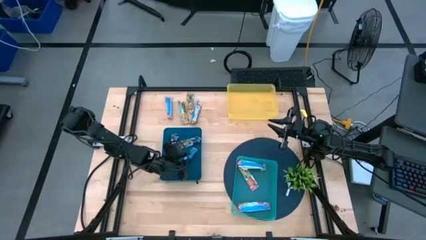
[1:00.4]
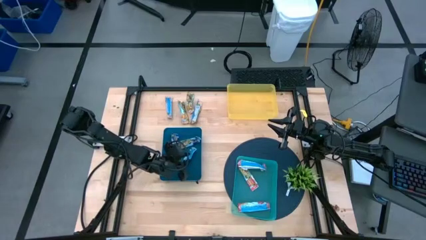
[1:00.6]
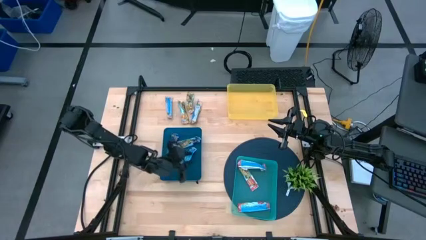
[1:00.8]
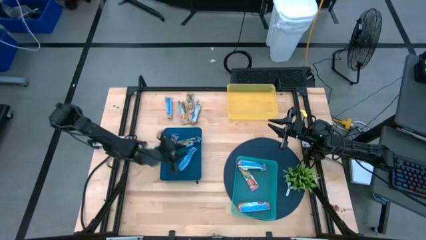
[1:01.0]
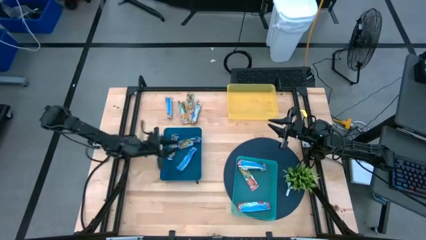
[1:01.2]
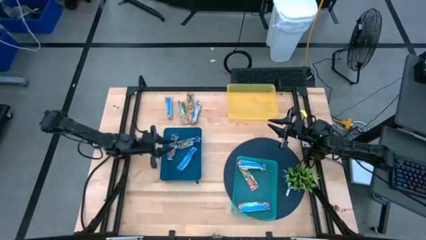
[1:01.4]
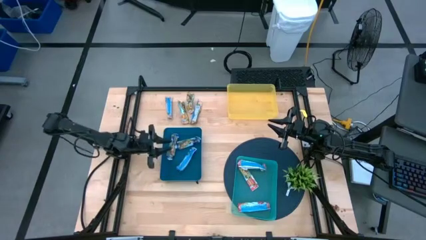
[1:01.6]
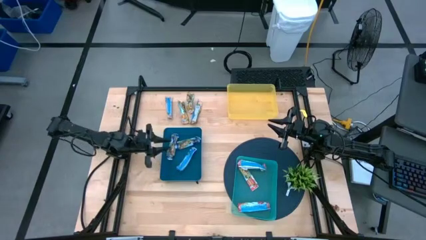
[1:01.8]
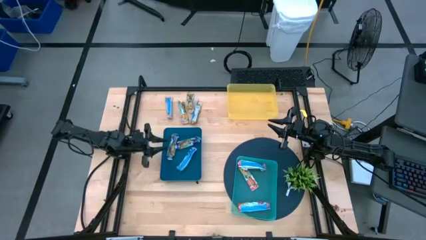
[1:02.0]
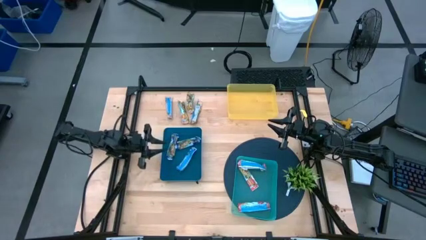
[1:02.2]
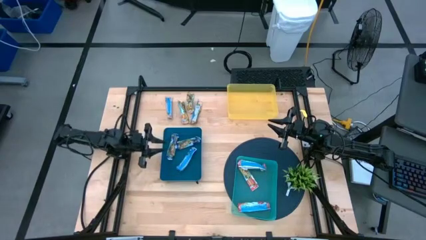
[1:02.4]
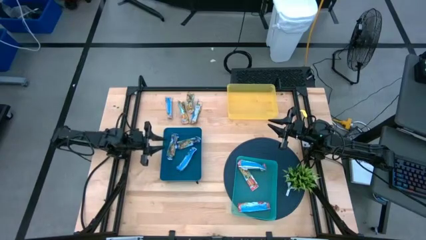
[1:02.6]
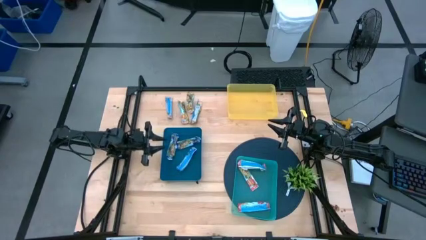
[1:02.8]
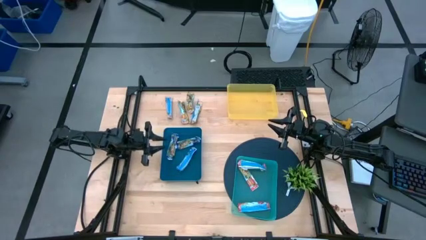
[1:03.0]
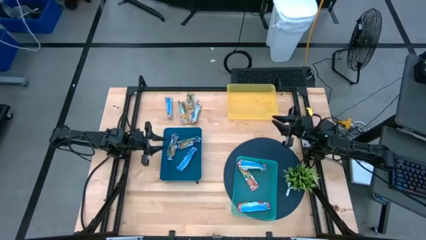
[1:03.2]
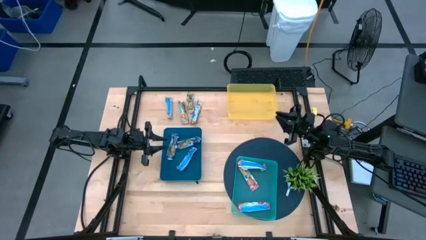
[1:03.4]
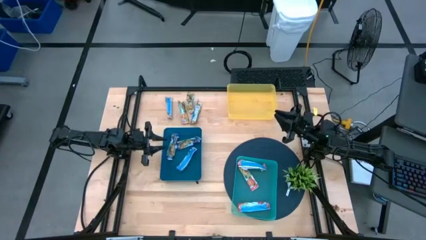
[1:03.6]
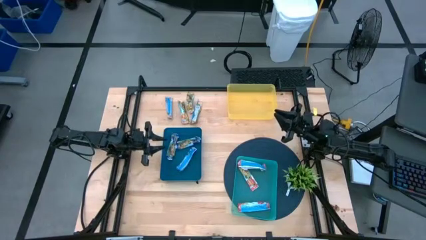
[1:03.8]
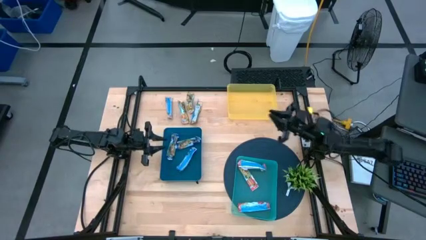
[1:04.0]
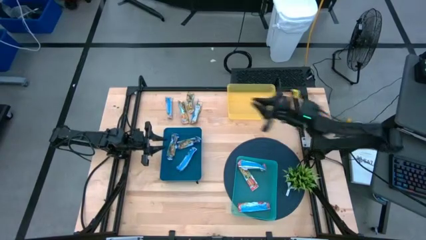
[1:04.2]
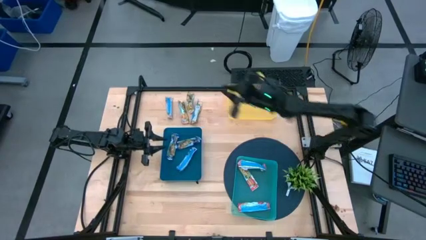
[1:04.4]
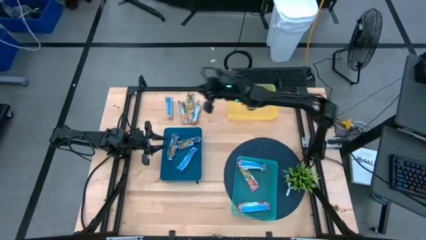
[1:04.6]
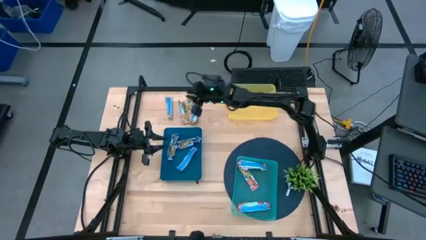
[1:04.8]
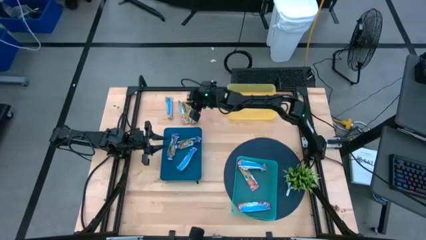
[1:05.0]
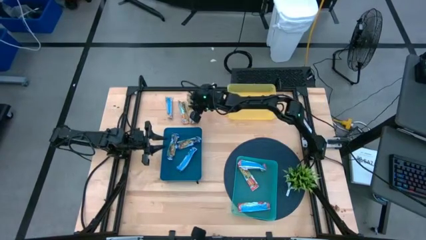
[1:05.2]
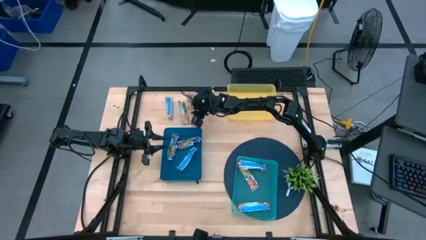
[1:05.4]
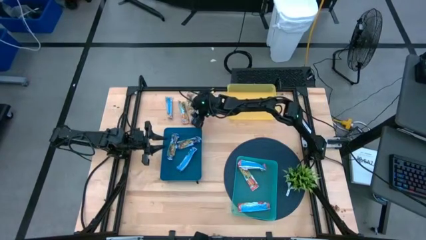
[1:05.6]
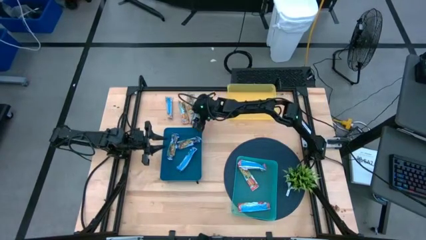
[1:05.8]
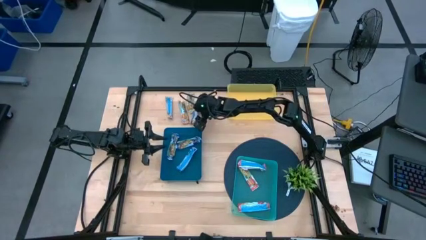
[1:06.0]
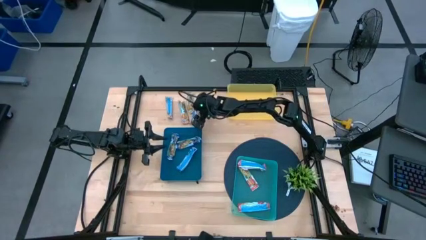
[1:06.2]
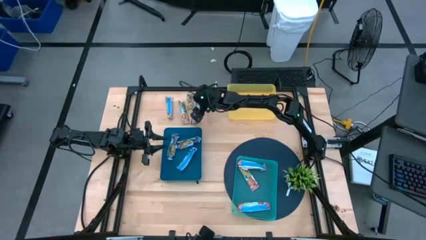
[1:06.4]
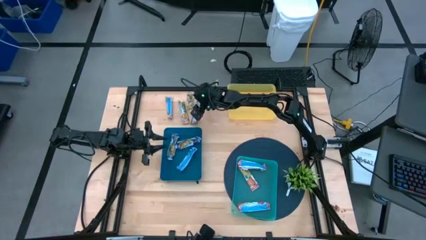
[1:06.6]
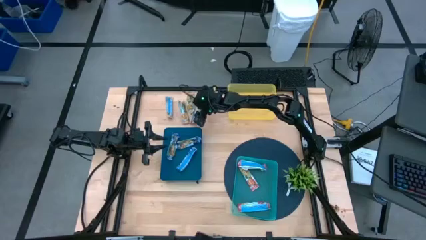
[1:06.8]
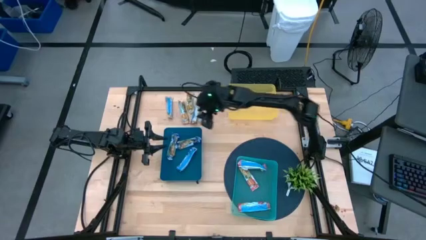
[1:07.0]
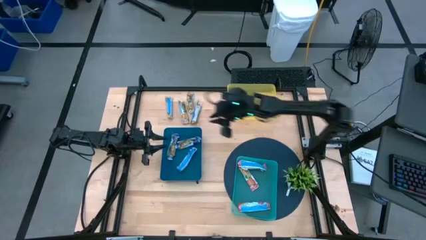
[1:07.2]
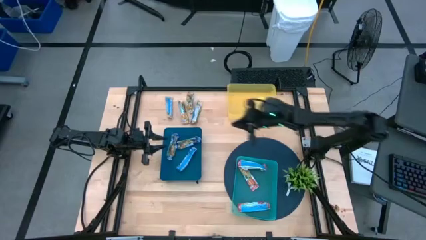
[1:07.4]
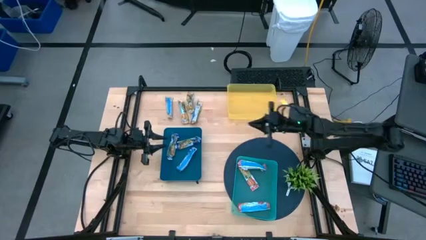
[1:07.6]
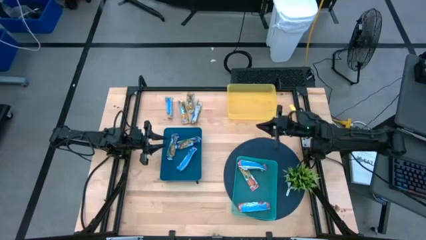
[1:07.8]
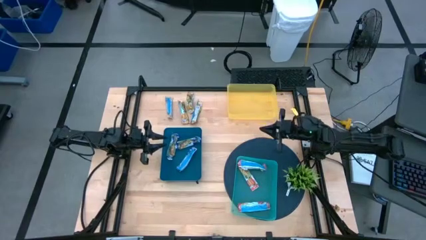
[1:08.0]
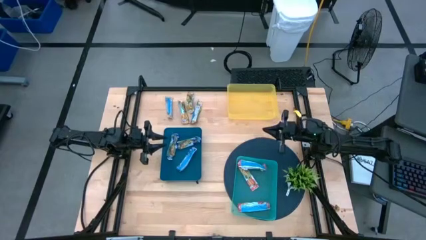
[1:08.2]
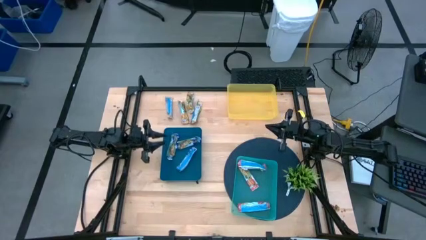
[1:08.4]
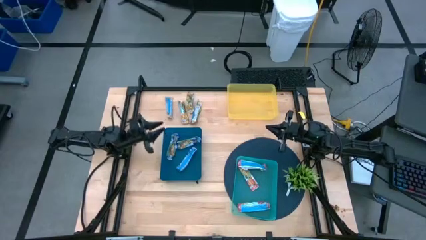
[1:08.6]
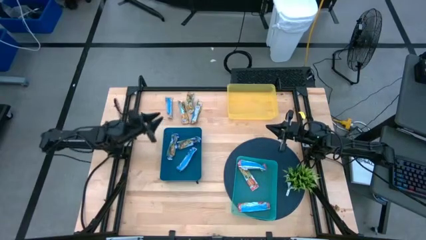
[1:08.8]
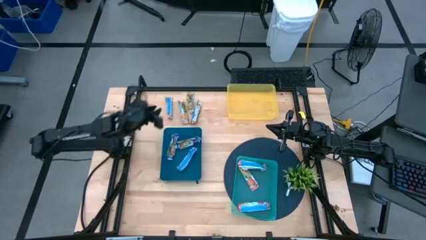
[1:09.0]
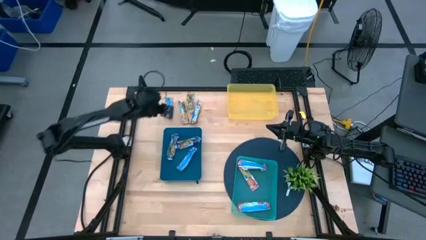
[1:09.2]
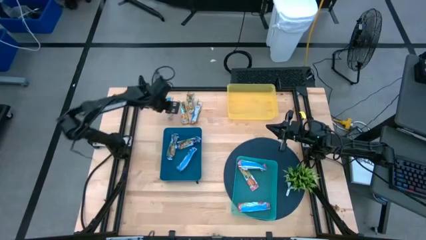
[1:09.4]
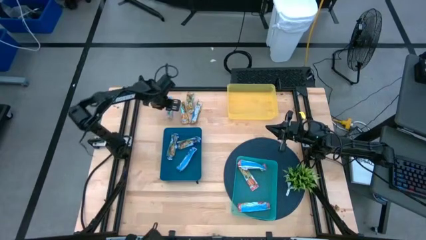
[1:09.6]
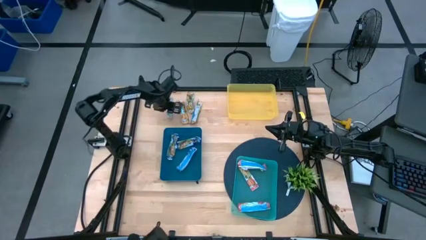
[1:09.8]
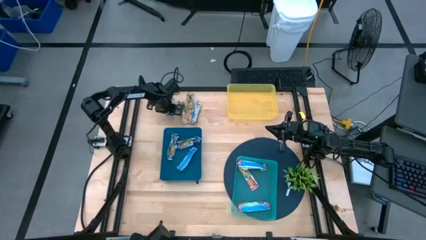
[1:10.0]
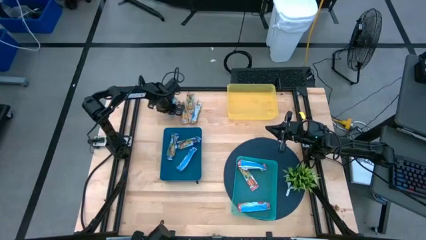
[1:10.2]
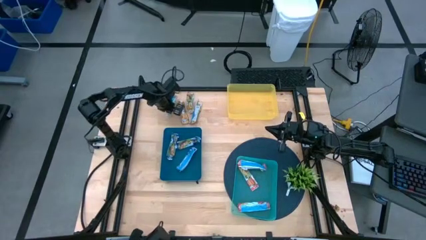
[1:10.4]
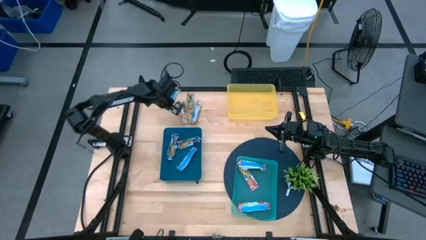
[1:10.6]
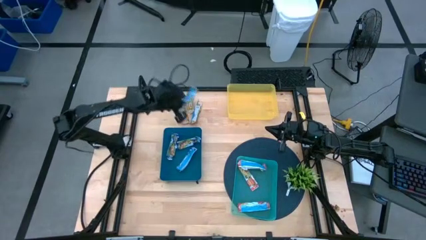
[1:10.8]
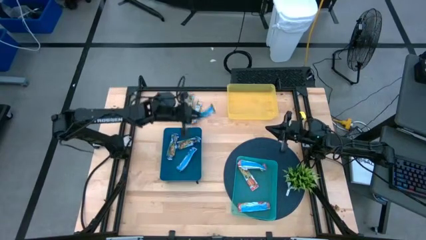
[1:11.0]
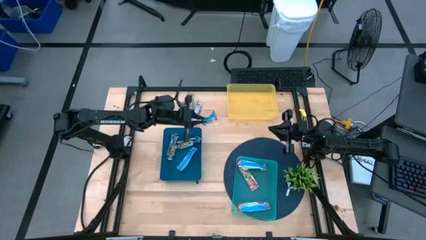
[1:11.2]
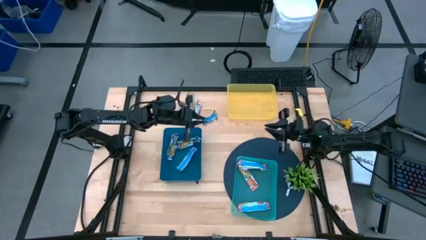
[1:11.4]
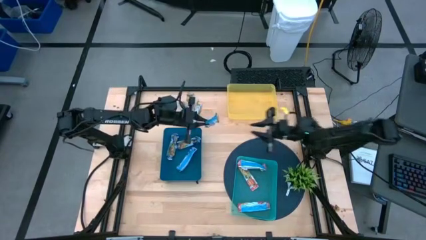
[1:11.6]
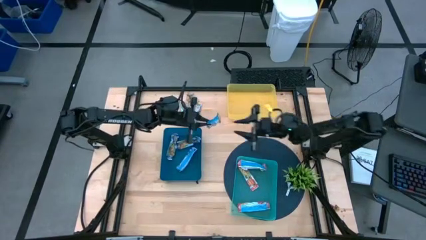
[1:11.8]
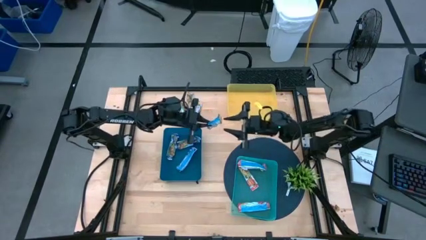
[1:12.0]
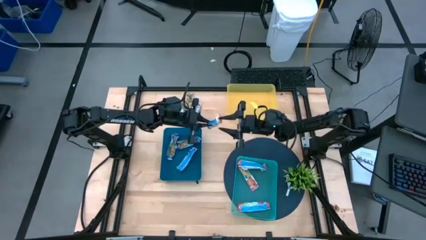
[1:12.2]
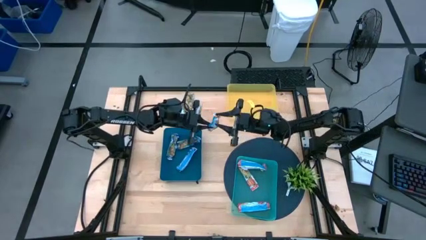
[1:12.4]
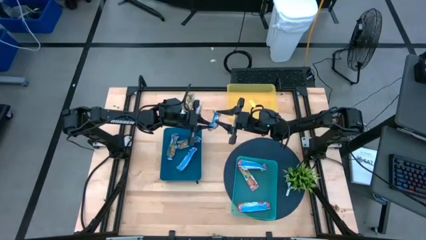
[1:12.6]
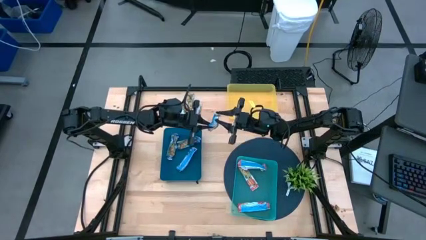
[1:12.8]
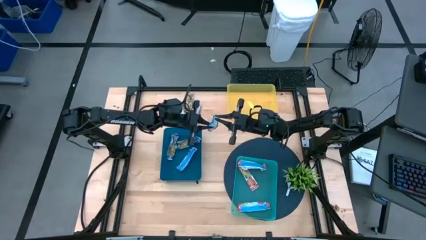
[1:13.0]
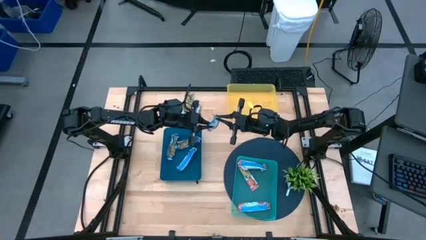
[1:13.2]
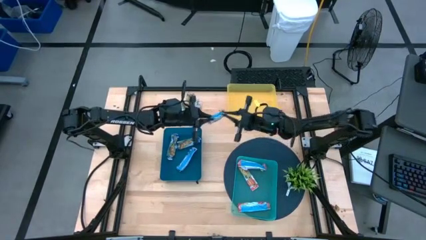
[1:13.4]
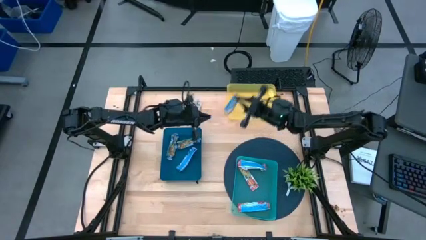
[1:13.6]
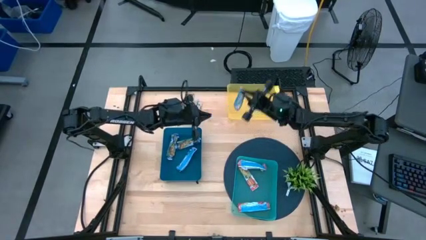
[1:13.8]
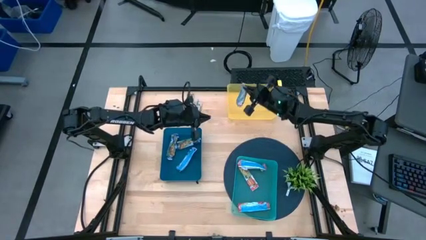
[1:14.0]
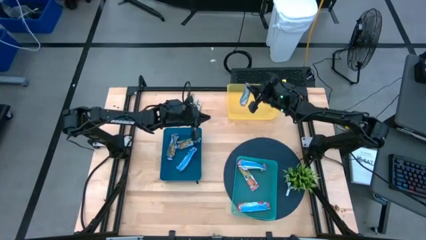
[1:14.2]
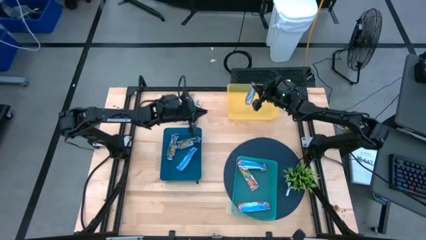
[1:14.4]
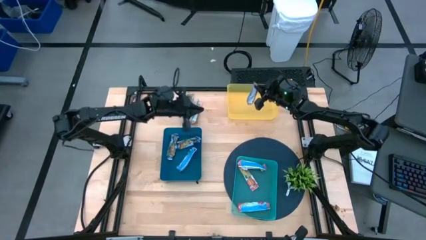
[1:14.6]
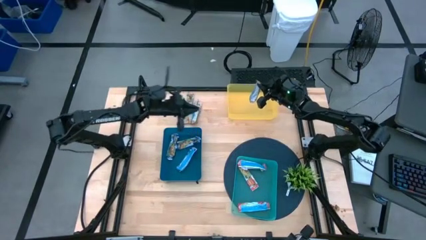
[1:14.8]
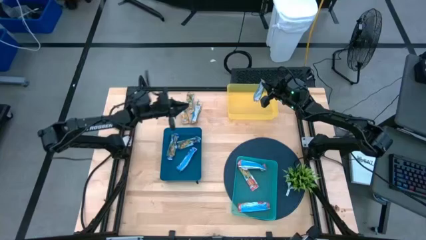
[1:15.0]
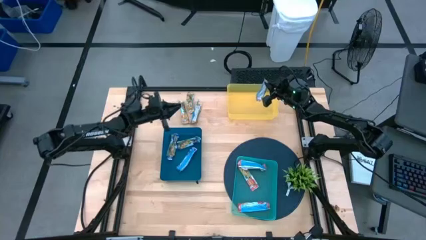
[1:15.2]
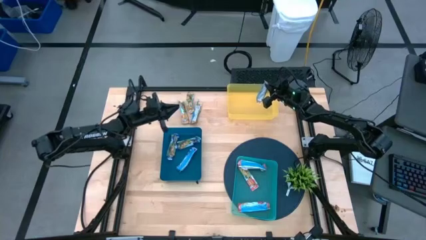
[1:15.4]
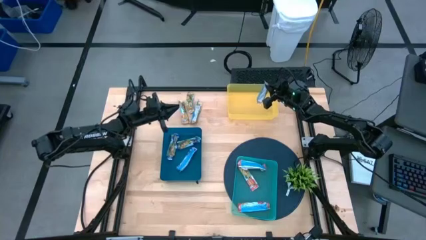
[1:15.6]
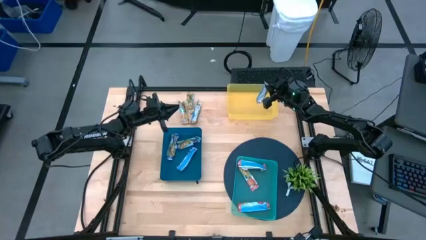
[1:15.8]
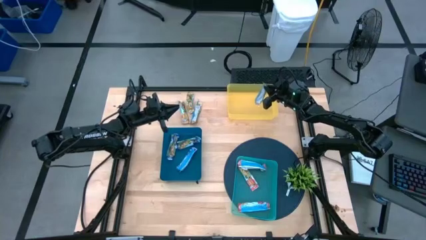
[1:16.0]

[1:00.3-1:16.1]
Task: Pick and place Granola Bars by type
Put the yellow granola bar into the yellow bin
